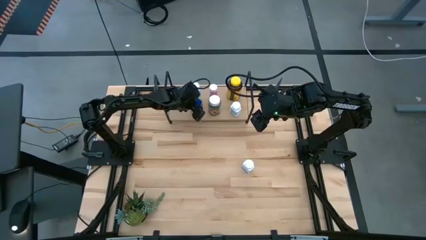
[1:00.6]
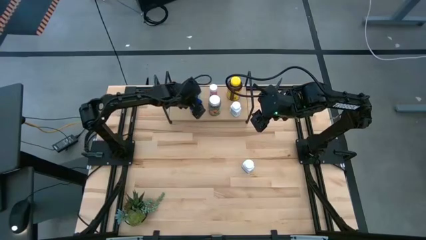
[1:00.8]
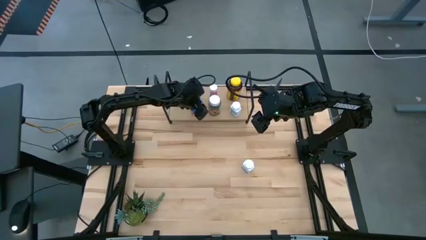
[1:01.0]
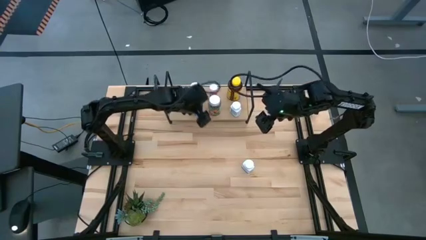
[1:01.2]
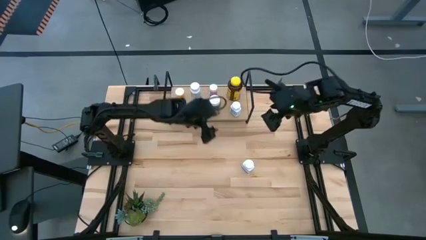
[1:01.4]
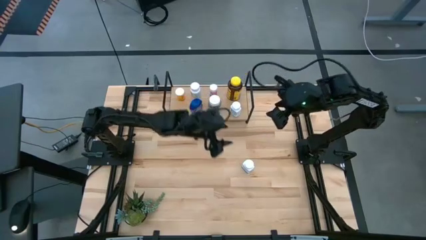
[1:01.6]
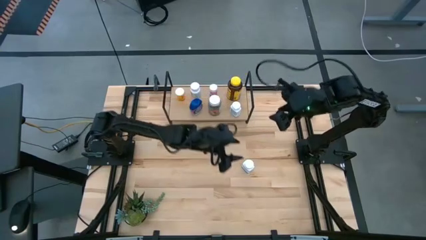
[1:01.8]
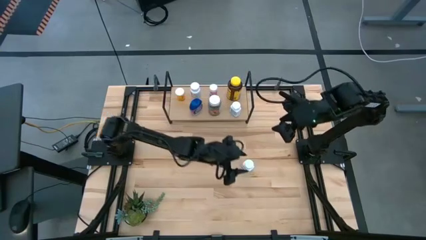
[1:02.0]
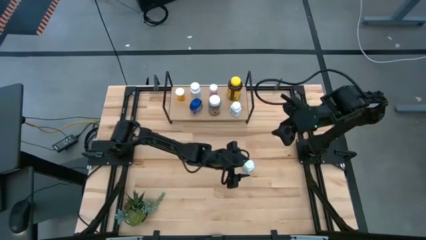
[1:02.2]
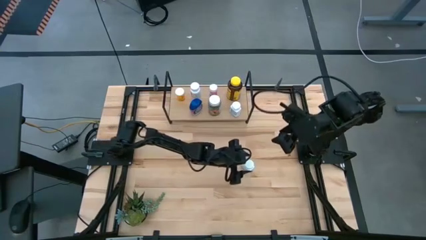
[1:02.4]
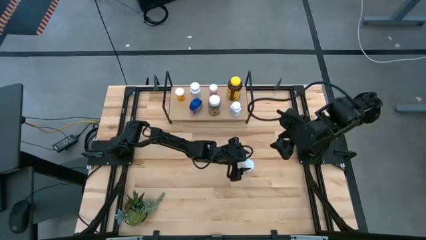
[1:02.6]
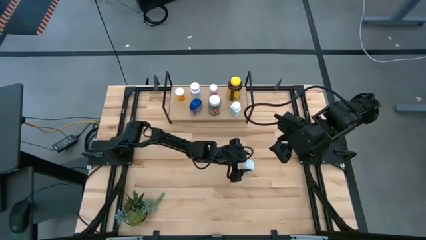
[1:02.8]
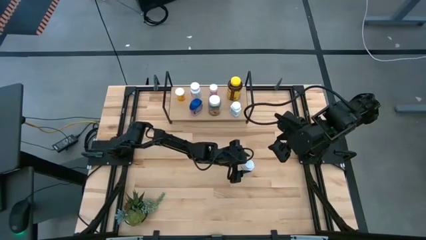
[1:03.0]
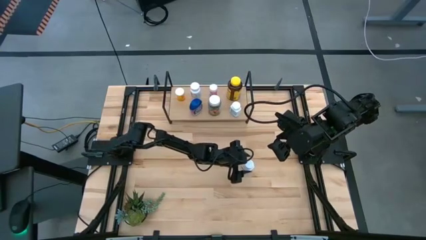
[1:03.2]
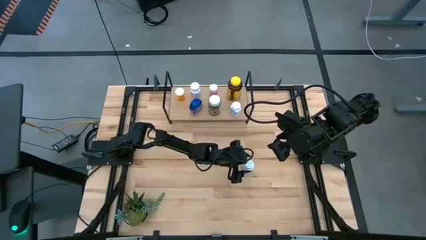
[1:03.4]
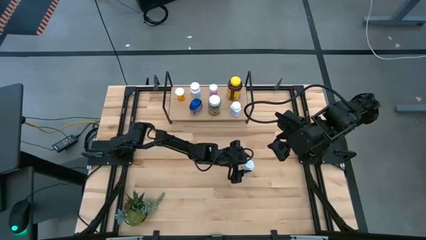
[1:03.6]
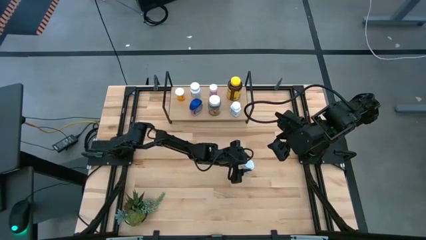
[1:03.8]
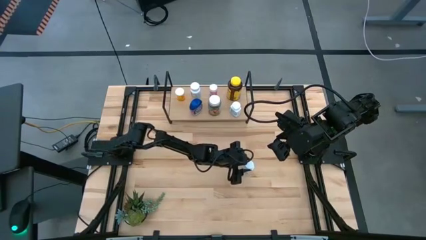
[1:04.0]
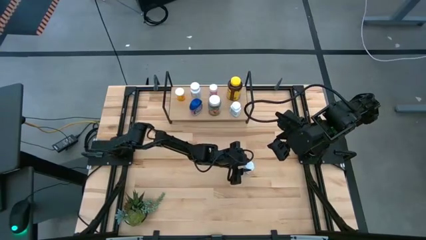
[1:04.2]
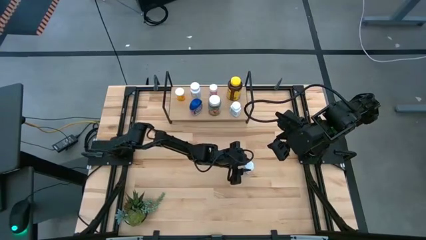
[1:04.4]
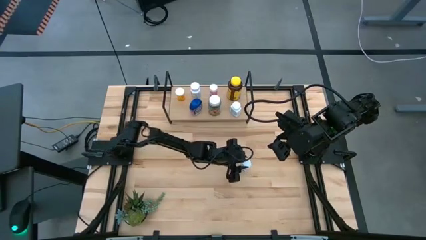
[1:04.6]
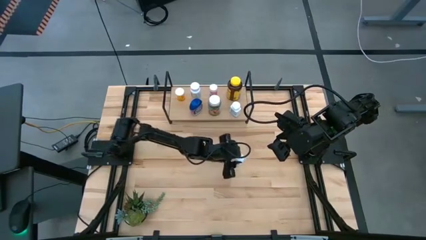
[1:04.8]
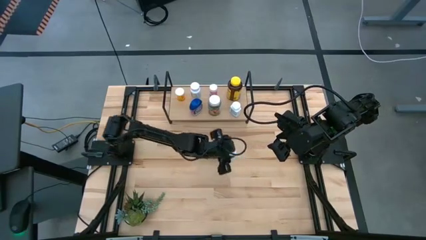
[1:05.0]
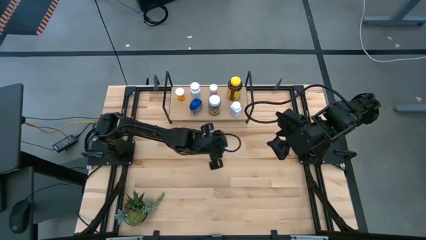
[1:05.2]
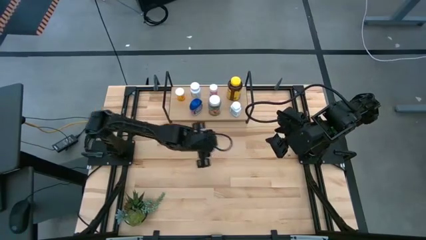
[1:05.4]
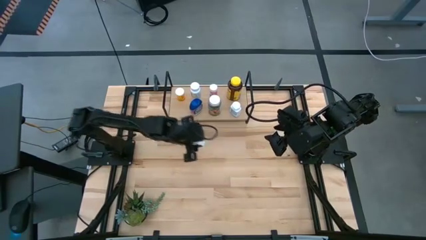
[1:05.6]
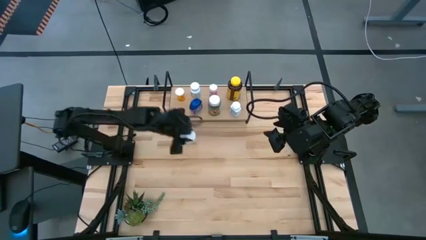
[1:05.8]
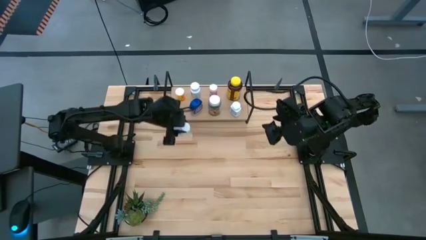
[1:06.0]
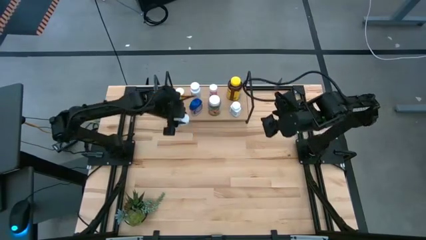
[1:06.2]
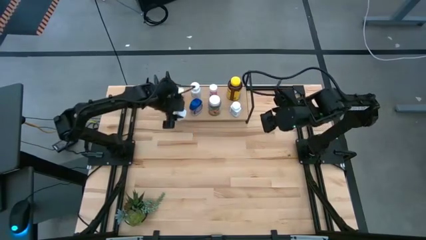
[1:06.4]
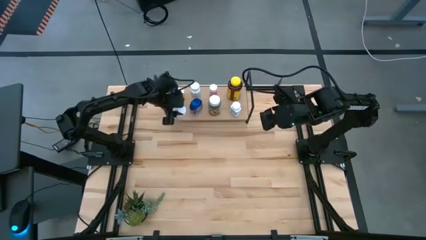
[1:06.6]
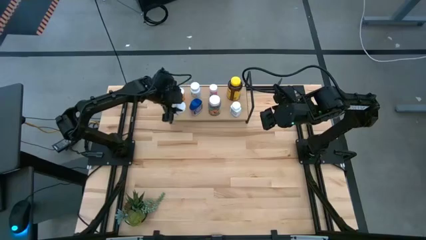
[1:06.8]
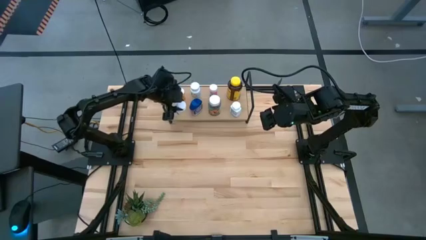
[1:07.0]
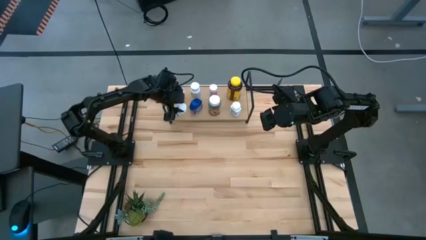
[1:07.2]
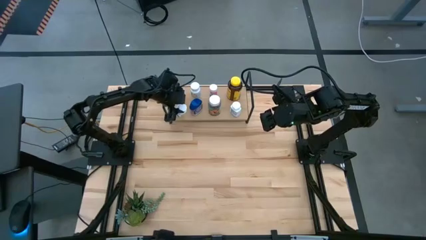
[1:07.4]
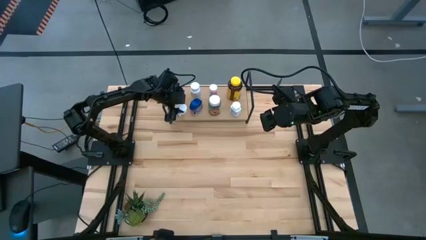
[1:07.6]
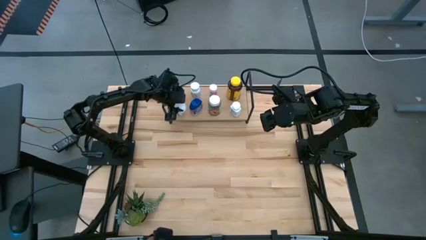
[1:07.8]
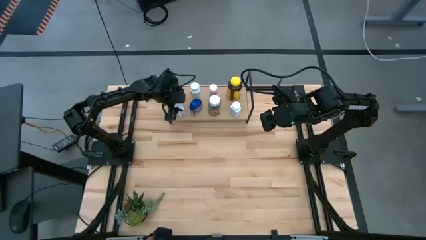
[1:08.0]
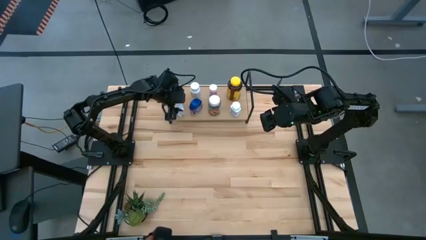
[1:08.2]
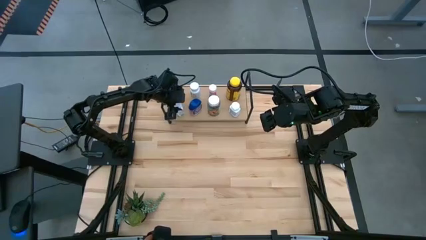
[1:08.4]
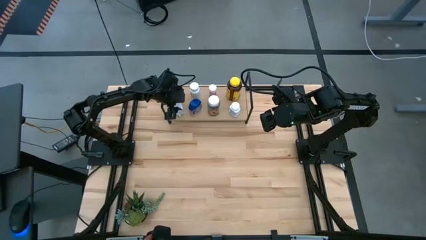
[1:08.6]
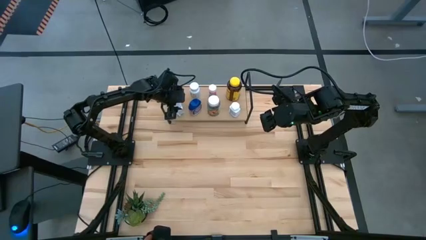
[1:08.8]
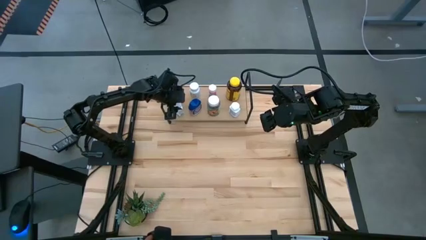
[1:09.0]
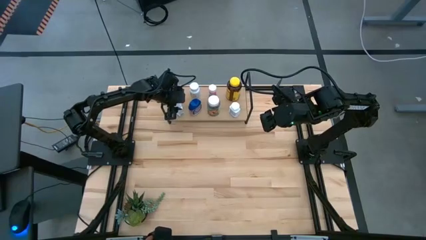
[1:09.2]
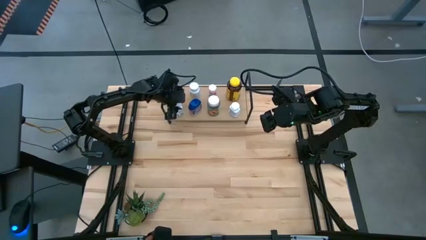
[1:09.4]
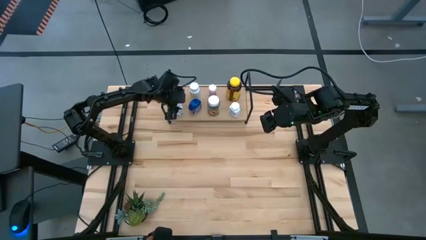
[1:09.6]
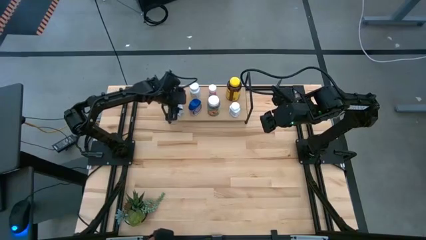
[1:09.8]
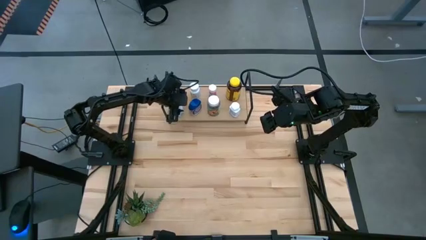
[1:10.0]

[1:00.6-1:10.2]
Task: Pick and place medicine bottles onto shelf by color
Put the white pill bottle on the shelf

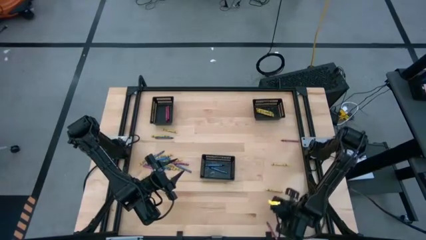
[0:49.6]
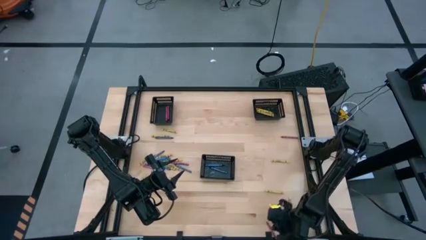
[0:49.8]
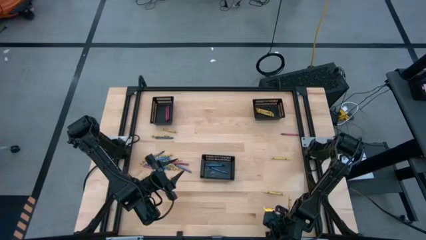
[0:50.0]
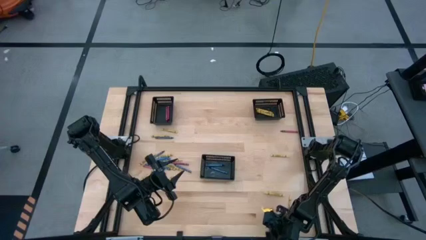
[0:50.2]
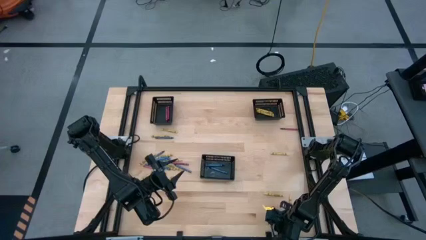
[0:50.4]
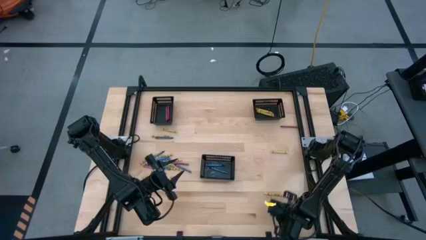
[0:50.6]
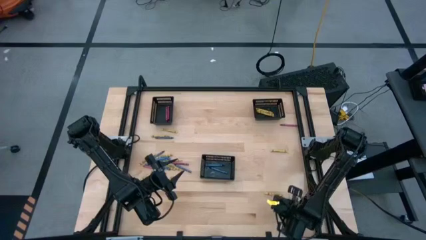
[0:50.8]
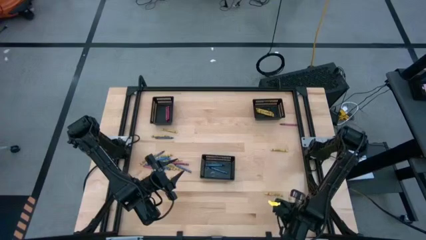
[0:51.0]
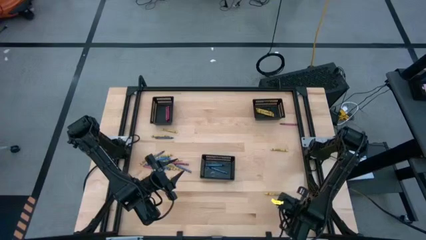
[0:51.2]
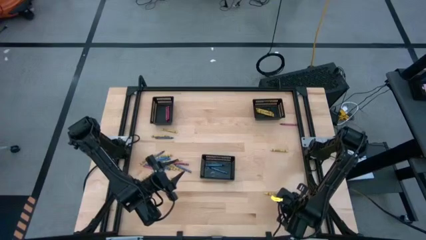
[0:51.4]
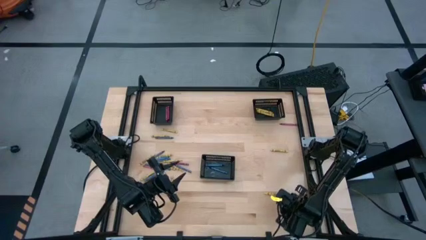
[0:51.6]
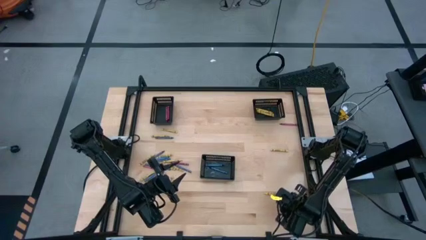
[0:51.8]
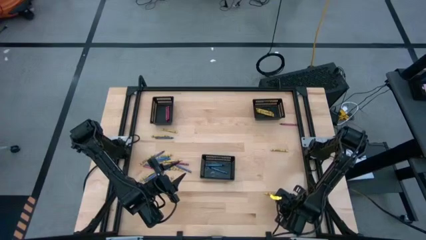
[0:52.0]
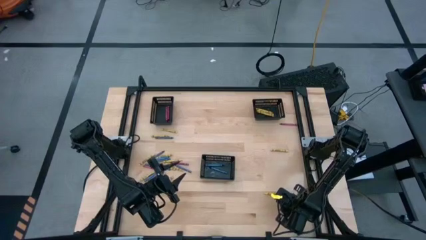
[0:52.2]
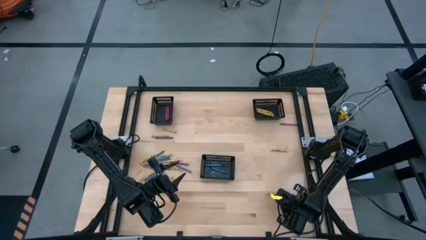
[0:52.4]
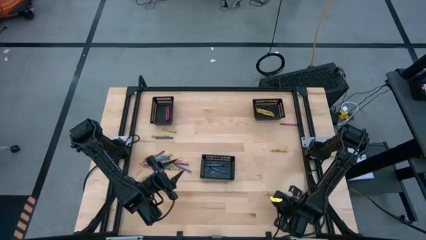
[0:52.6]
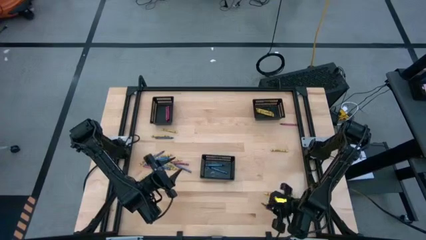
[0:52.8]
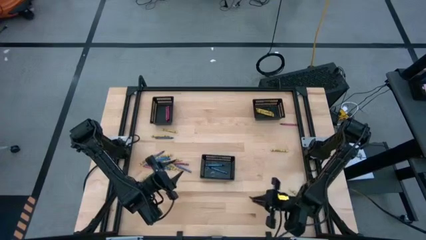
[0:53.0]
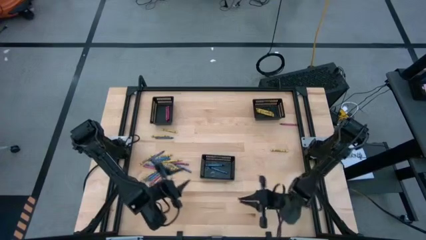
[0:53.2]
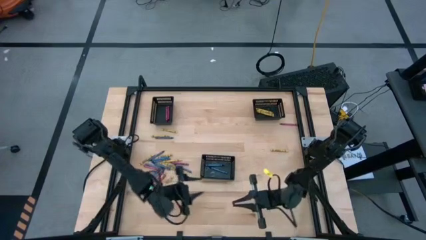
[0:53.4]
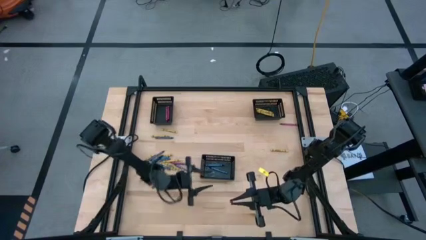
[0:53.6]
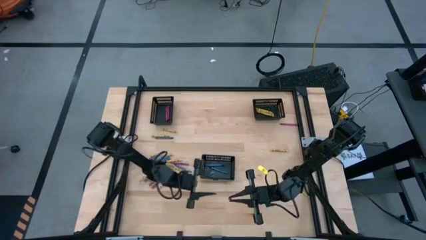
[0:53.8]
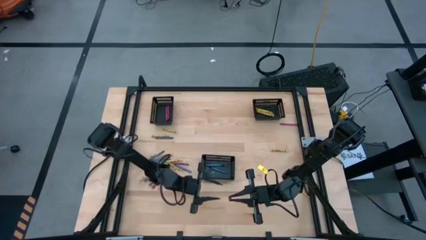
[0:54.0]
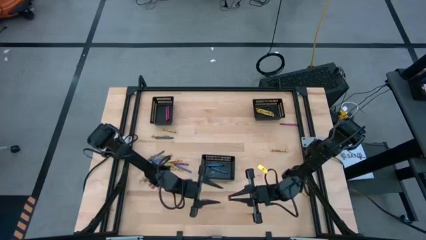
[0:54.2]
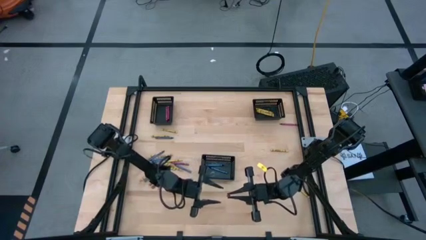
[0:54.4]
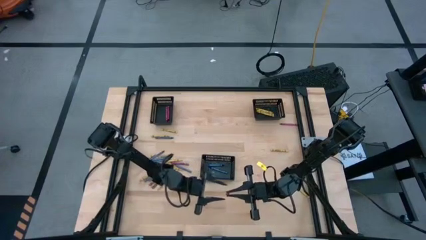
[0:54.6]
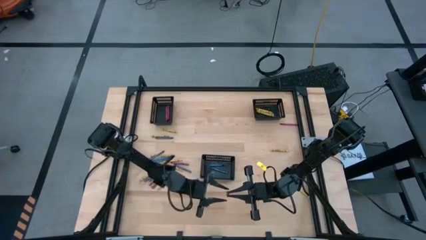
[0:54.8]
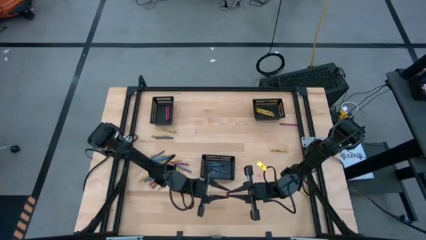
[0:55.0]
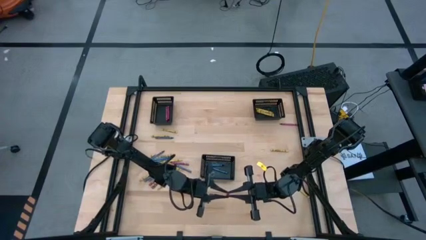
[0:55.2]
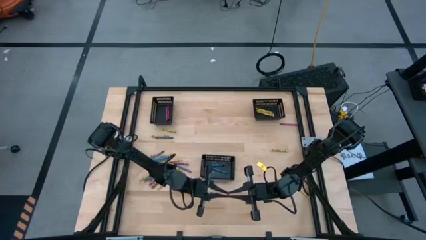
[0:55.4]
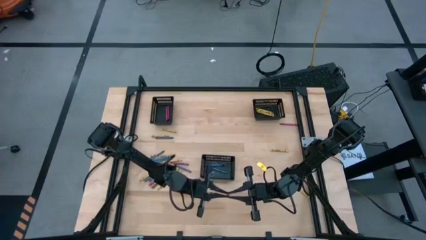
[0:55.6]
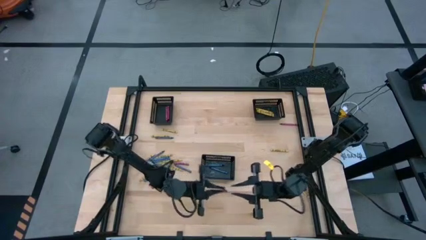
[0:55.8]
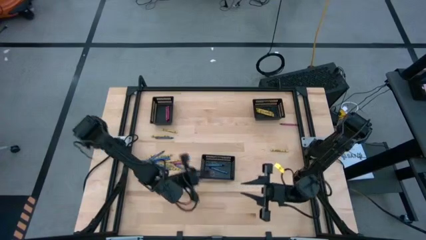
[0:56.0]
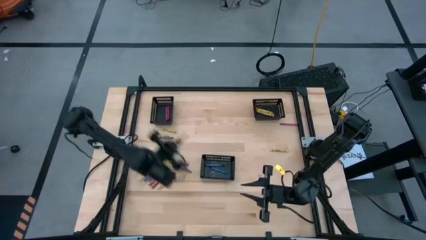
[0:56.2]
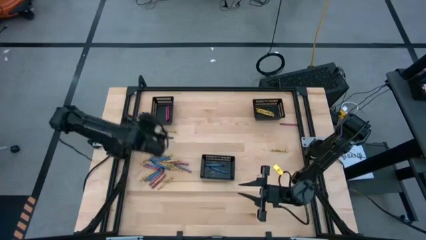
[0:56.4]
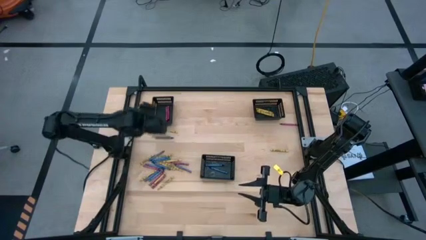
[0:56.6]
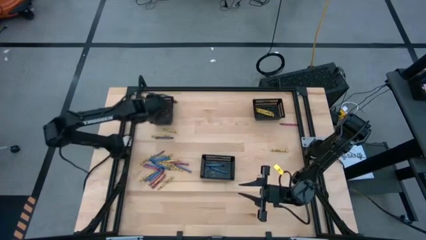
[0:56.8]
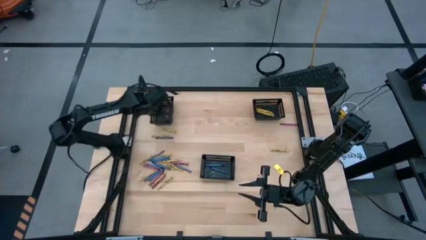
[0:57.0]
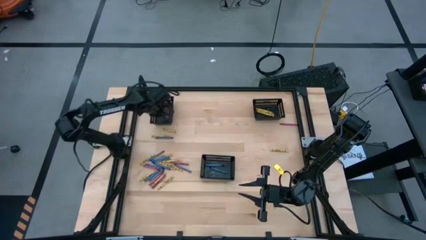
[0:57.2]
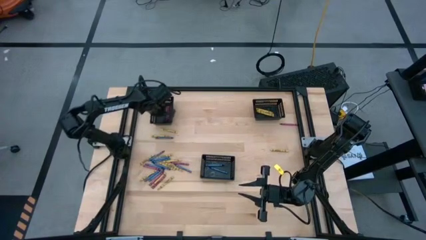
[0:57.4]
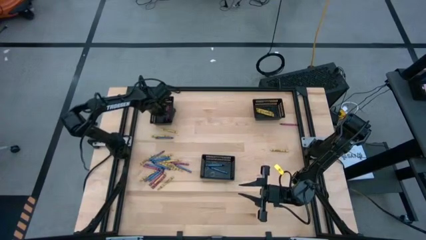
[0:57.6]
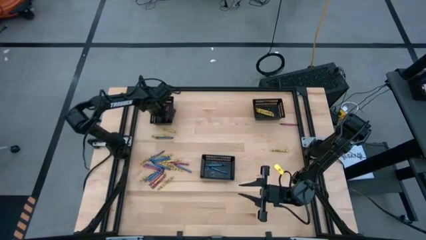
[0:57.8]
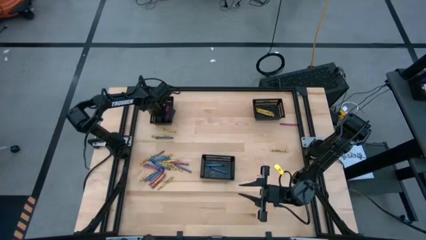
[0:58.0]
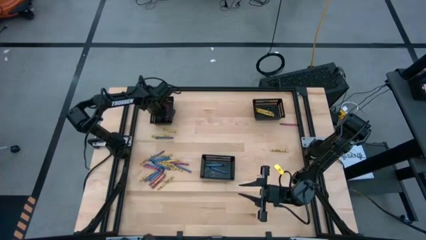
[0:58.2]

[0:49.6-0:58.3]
Task: Sort crayons
Put the pink crayon into the top left black bin
